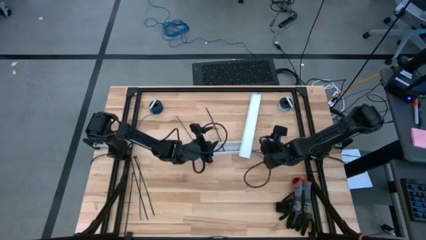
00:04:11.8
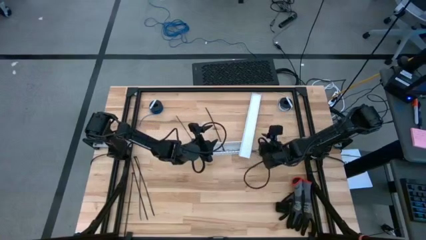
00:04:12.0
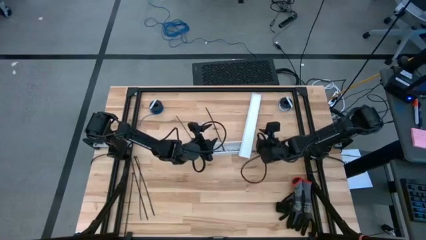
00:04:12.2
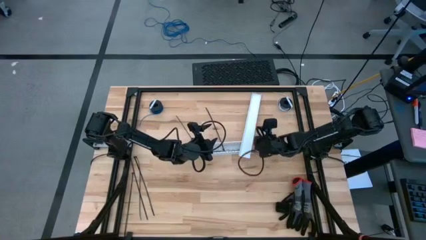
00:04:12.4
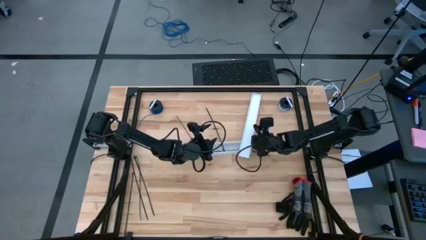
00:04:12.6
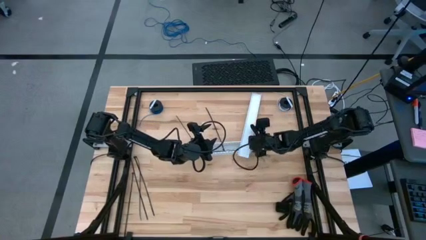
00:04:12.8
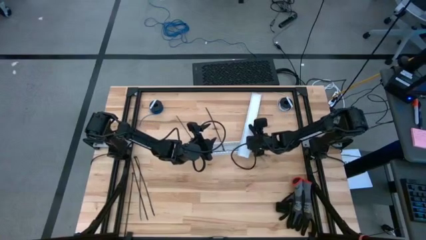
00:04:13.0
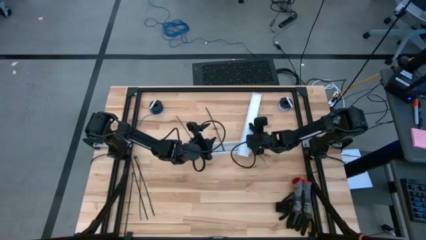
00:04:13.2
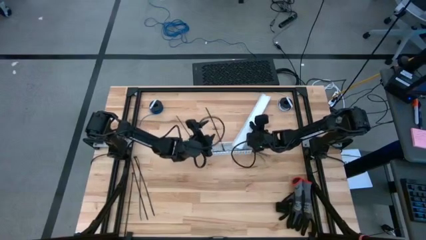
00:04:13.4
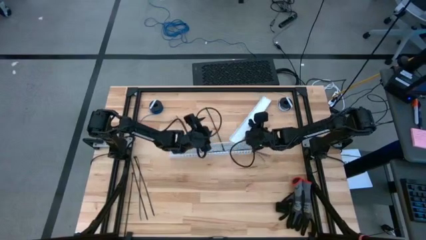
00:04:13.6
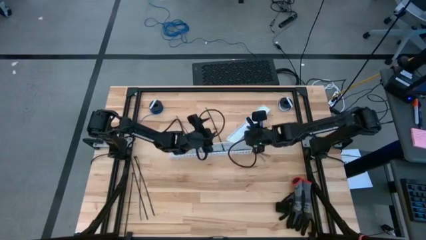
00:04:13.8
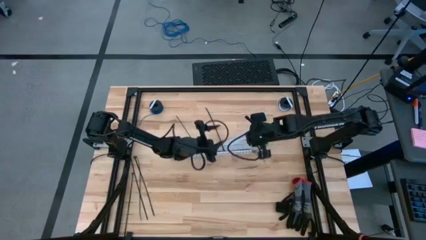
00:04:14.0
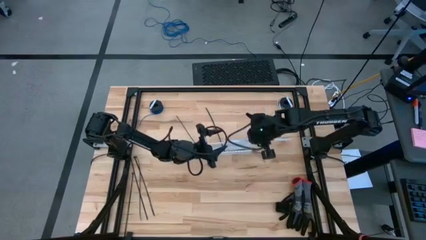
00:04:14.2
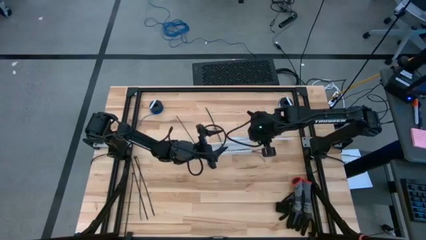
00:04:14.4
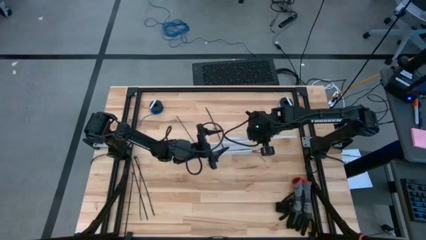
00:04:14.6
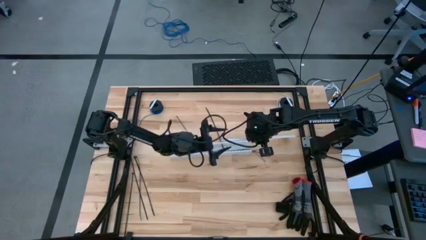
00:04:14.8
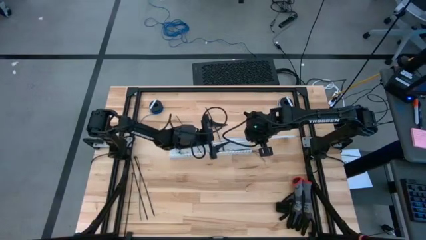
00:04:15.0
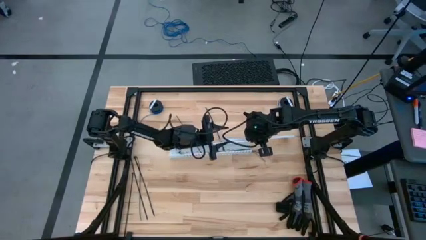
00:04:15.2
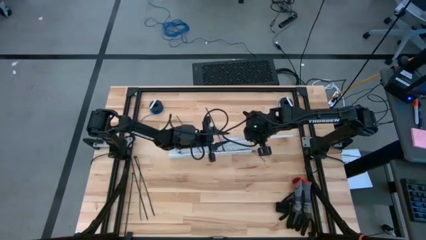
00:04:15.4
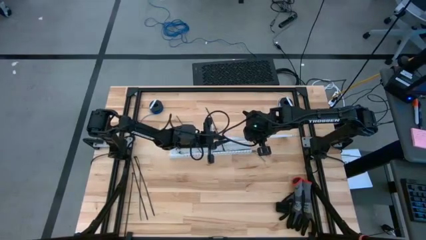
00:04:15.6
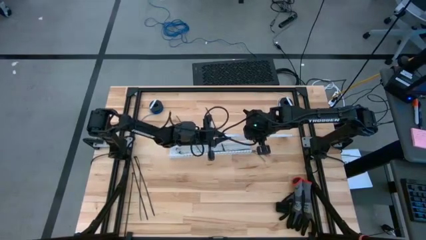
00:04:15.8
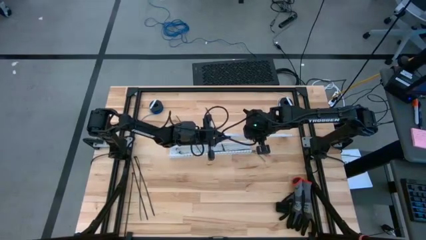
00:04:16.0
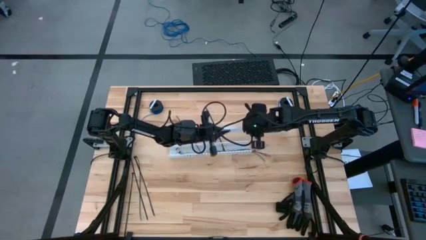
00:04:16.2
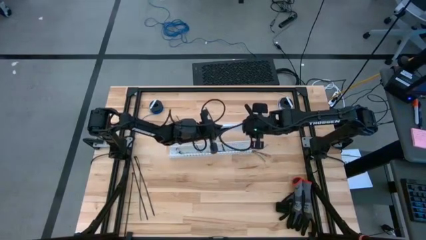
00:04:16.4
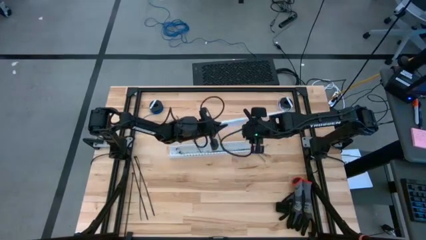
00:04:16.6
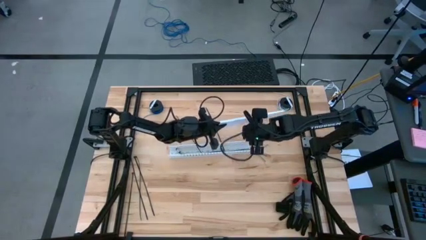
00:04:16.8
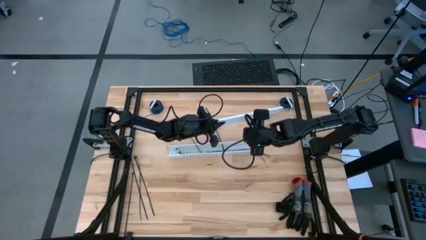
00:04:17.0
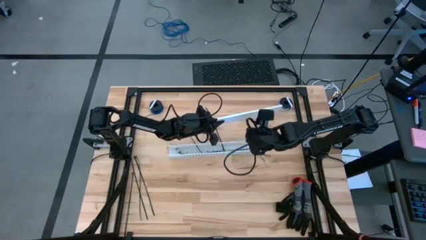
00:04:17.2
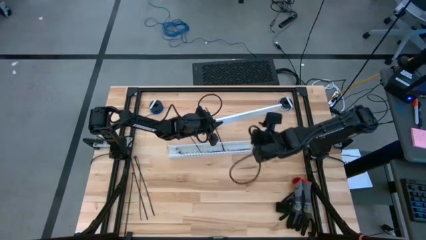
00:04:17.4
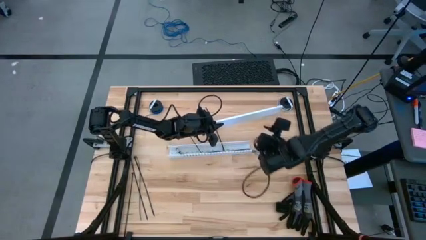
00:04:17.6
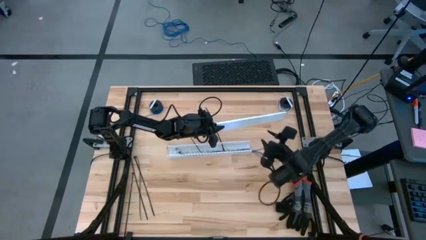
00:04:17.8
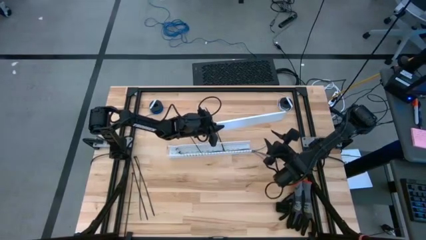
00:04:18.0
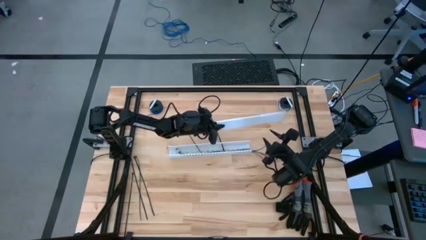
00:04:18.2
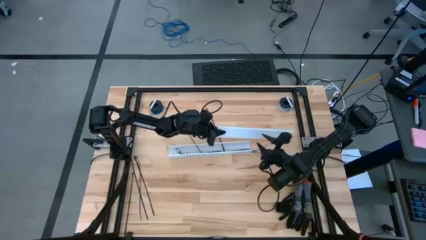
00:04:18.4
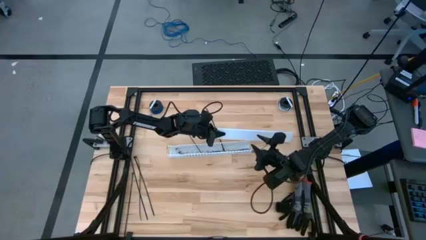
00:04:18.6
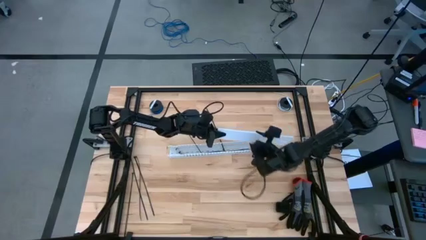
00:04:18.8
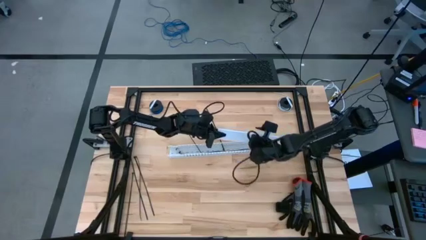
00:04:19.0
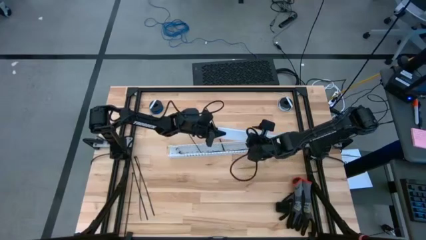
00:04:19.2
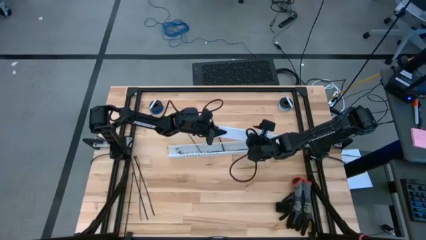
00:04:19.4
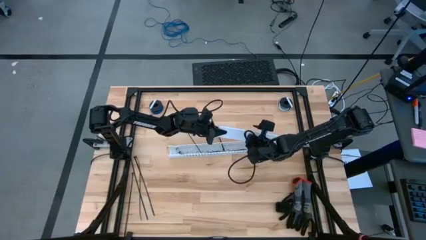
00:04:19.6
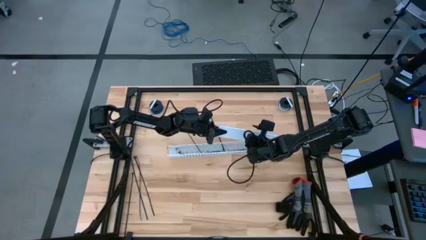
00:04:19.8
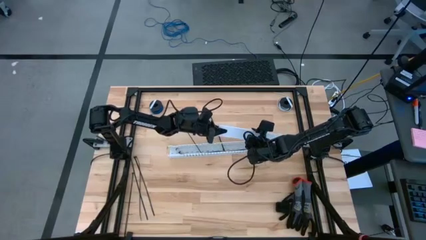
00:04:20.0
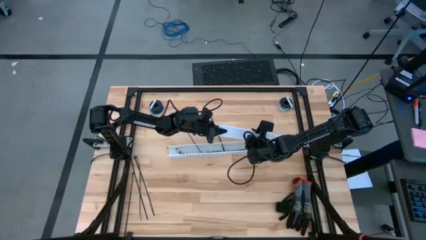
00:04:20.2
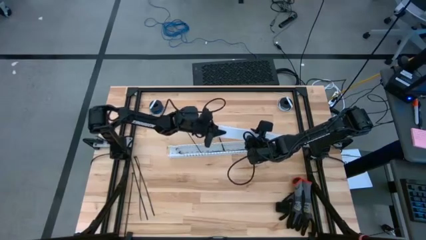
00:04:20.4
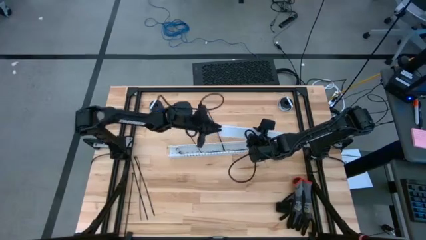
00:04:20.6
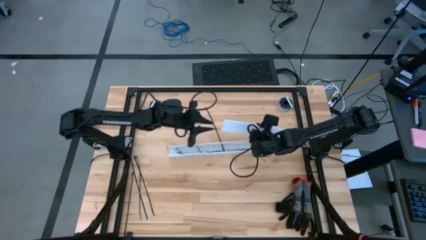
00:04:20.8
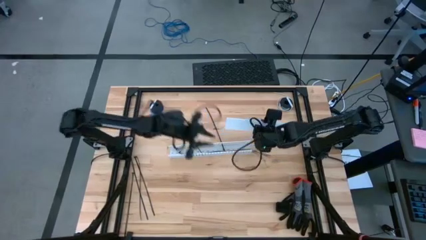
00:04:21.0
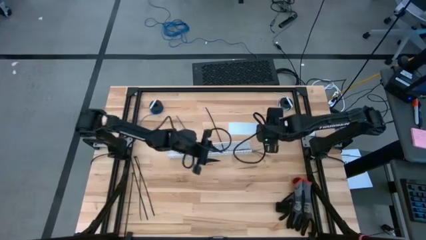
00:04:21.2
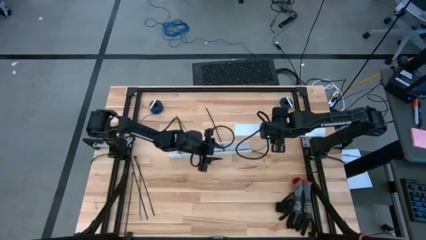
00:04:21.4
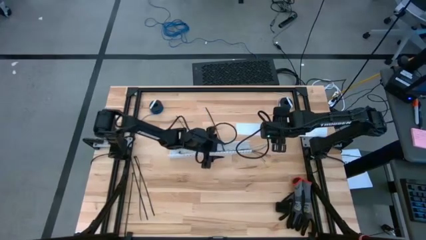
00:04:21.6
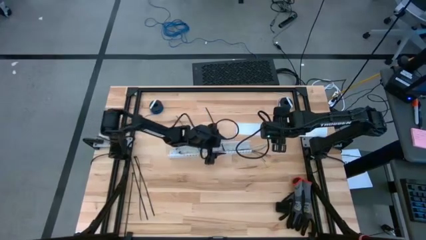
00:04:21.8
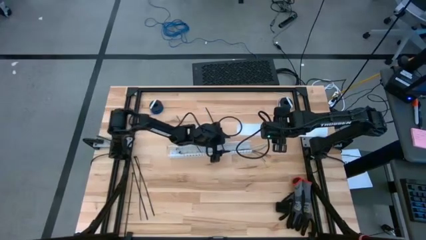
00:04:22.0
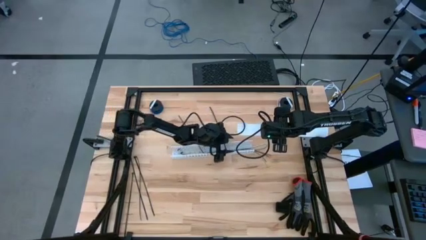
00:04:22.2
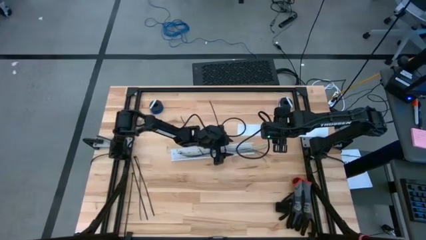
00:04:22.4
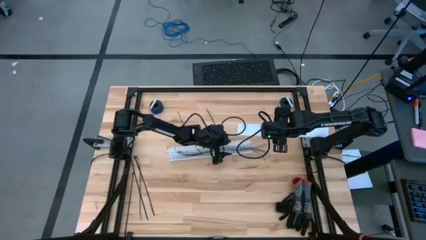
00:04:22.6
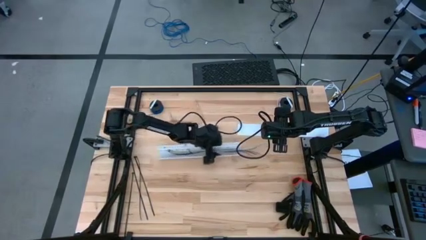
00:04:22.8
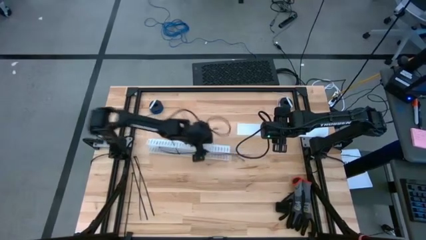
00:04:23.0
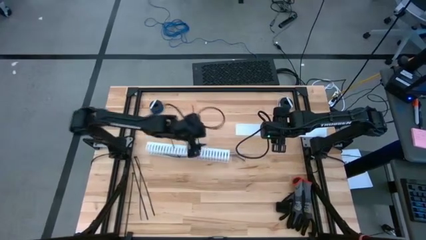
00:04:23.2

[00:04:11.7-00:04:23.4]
Task: Ziptie cables
Close the white cable duct

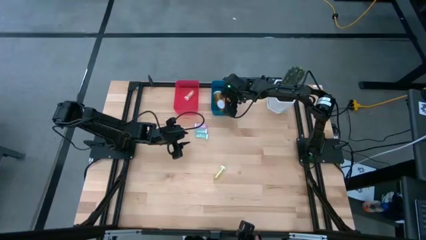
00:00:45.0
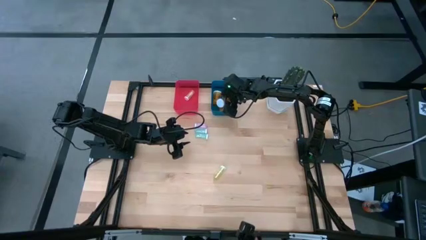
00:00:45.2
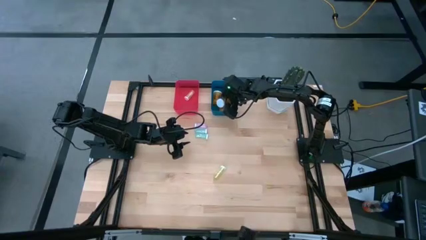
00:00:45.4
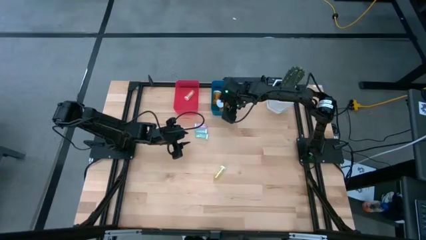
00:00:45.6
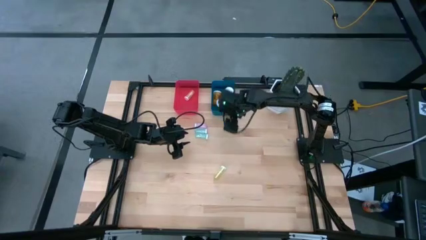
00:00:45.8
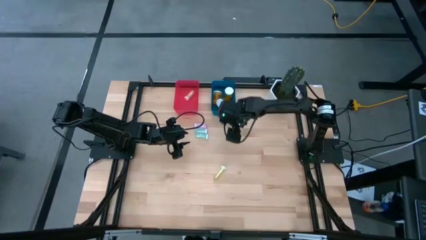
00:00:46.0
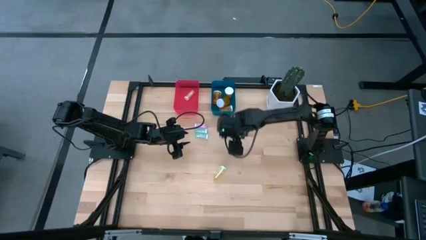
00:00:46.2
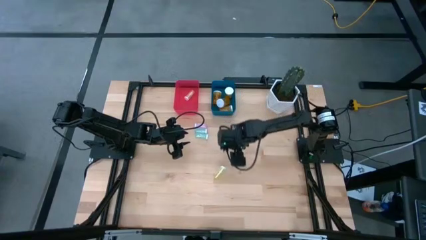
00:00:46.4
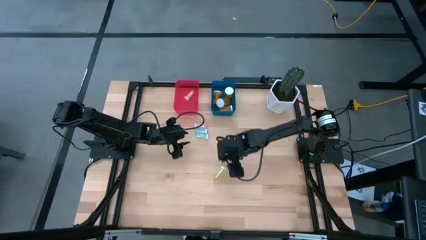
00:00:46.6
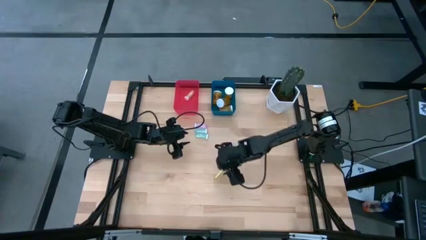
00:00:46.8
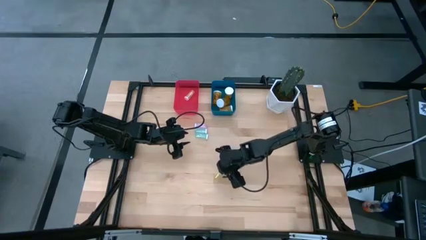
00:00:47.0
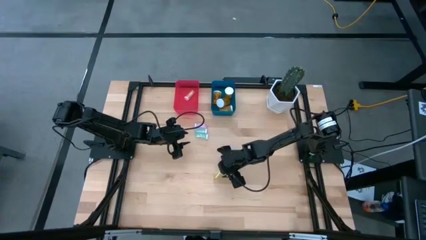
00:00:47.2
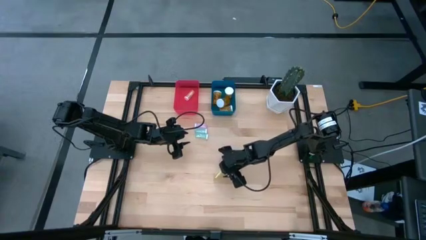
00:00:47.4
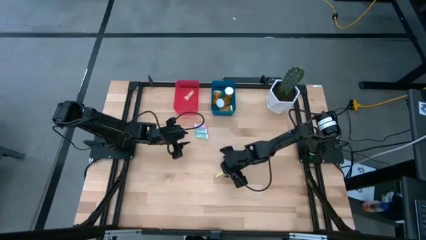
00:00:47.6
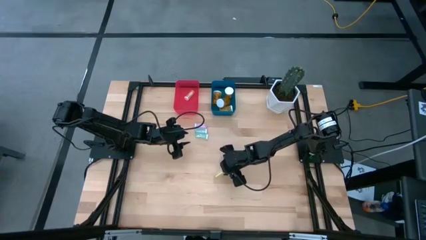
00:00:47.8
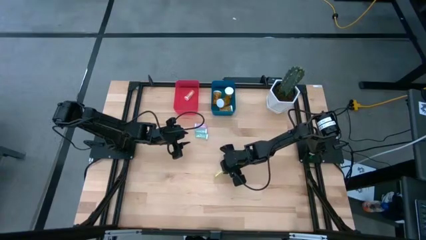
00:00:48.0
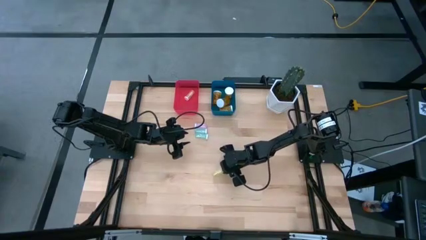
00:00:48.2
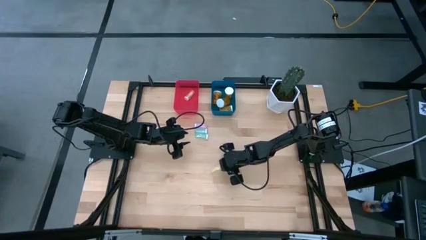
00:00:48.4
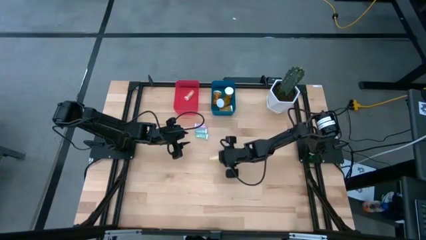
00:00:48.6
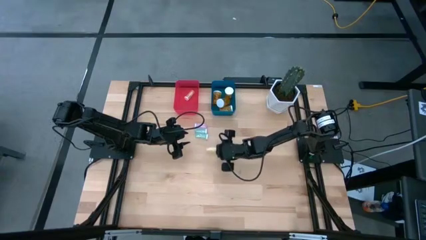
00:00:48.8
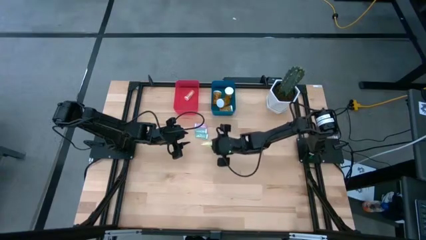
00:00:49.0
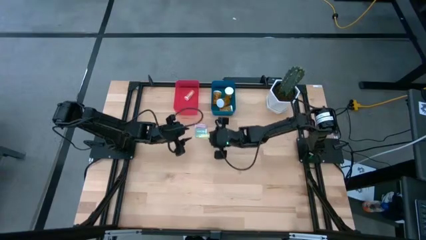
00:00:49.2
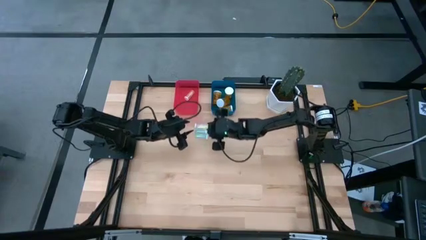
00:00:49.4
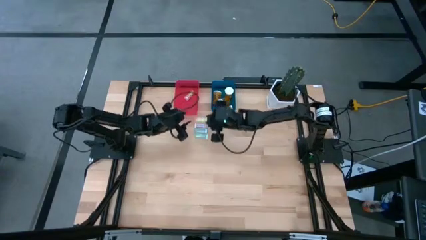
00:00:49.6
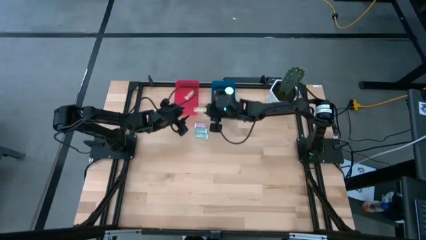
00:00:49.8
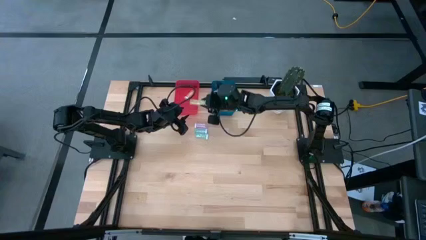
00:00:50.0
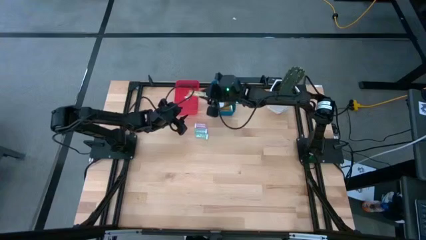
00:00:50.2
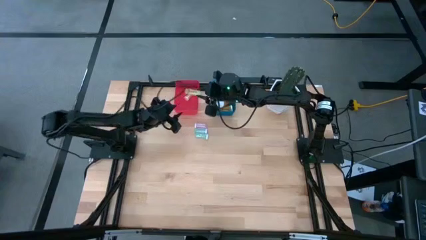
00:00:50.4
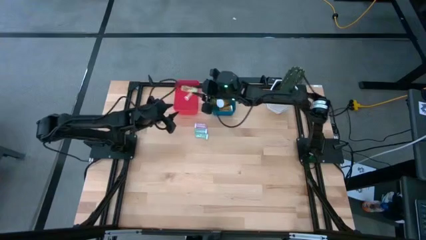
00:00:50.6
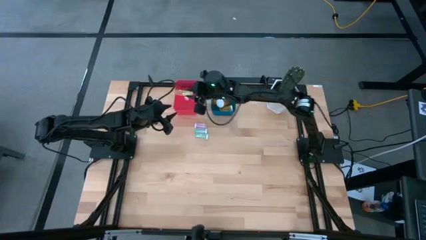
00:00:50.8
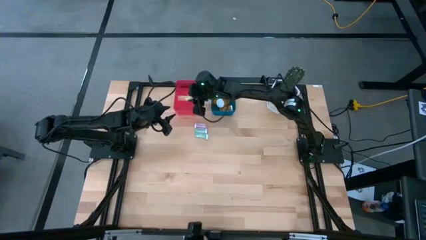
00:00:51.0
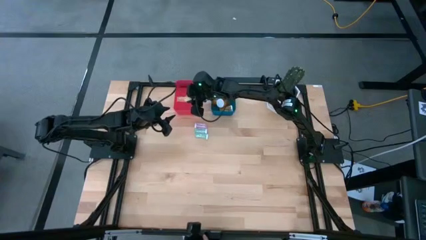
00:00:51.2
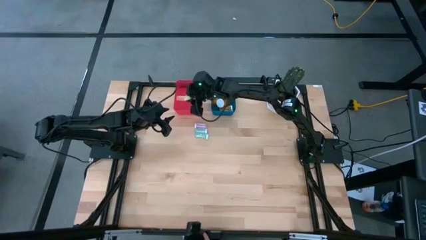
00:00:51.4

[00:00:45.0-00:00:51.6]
Task: Pick and place medicine bottles into bin by pill shape (circle, oval)
Put the yellow tablet bottle into the red bin
